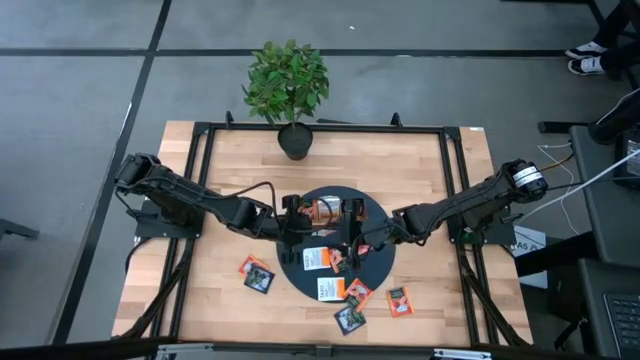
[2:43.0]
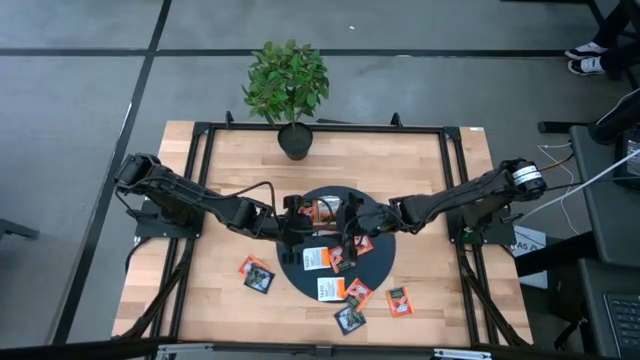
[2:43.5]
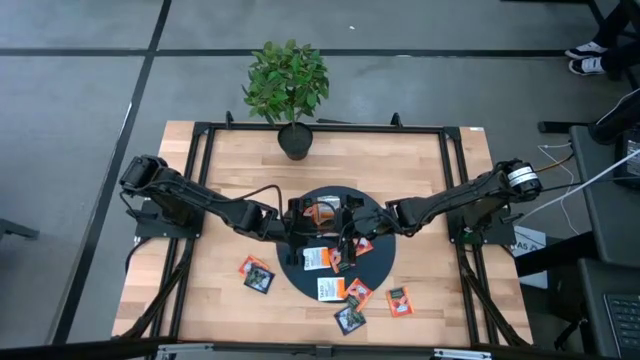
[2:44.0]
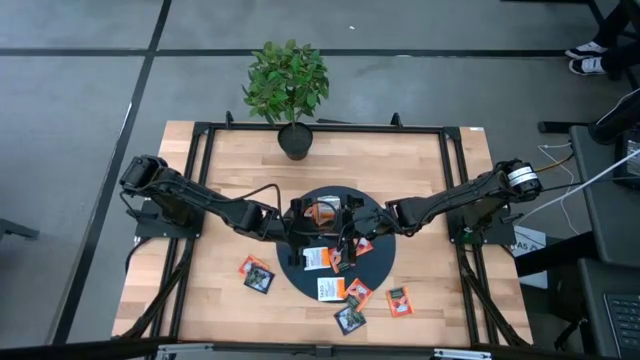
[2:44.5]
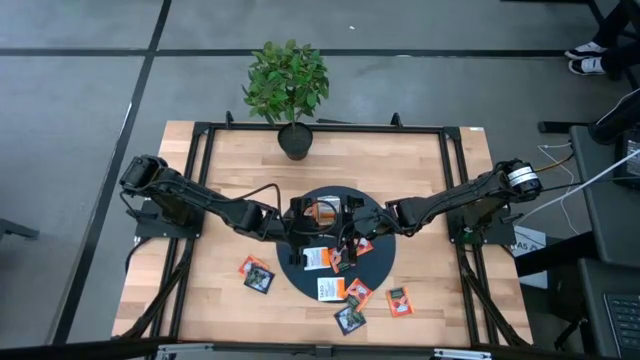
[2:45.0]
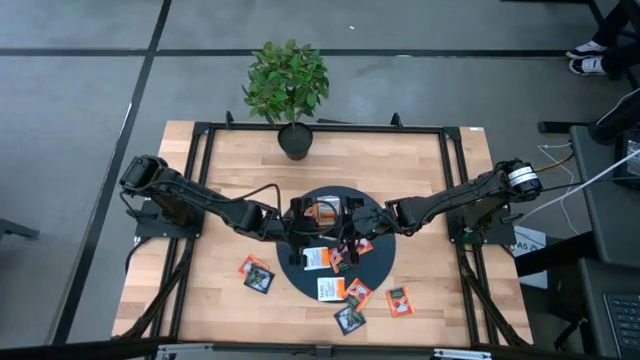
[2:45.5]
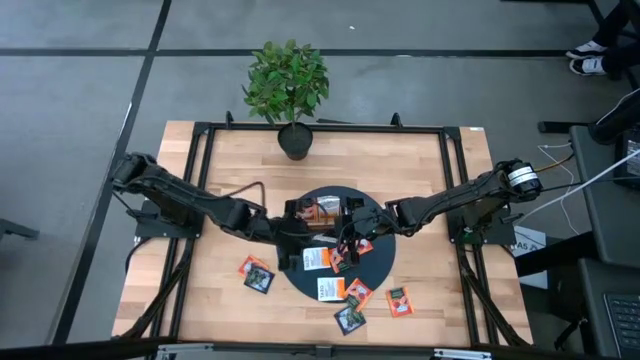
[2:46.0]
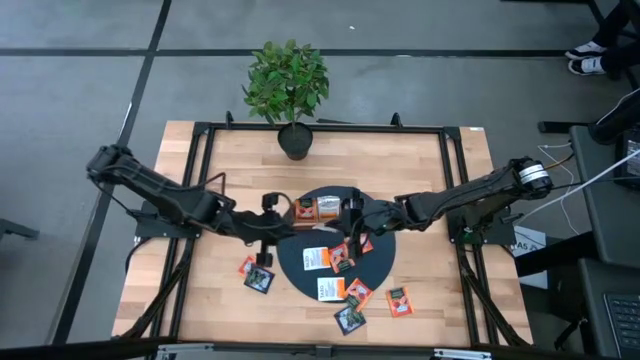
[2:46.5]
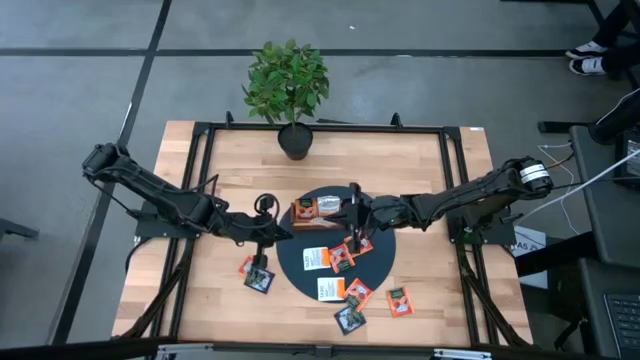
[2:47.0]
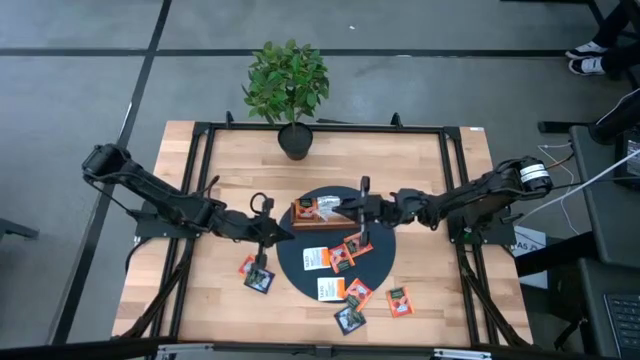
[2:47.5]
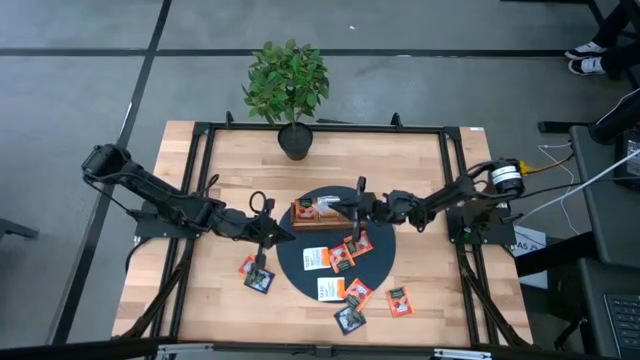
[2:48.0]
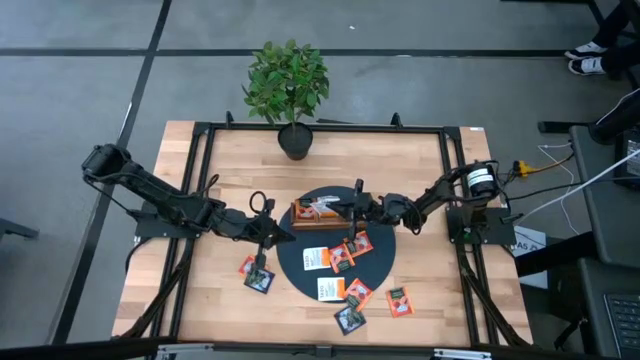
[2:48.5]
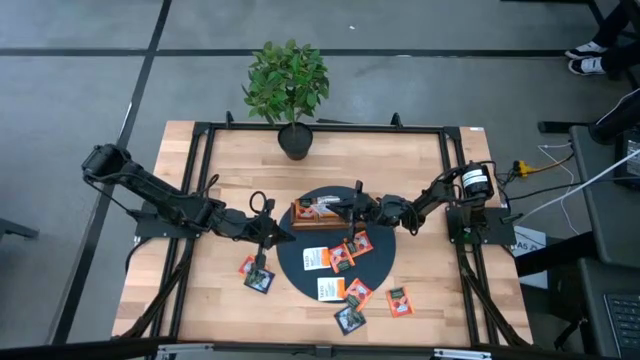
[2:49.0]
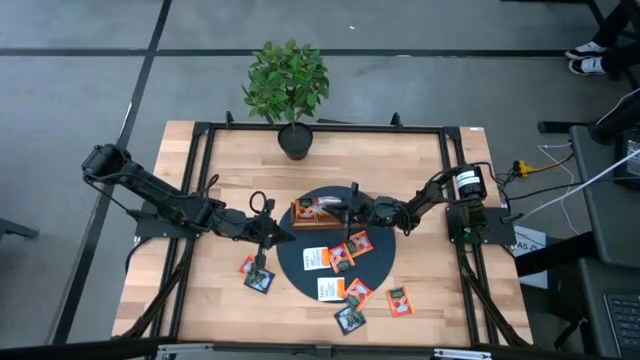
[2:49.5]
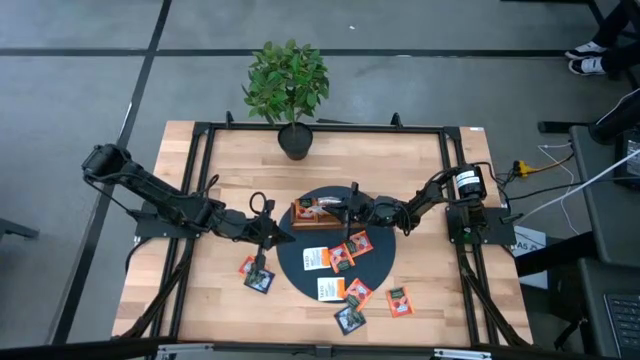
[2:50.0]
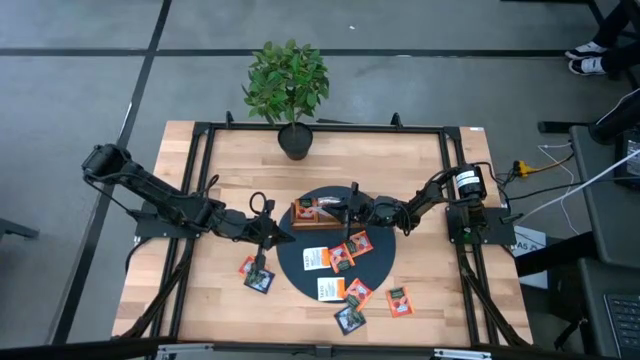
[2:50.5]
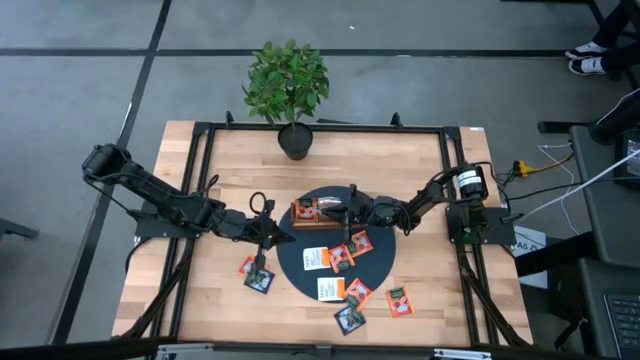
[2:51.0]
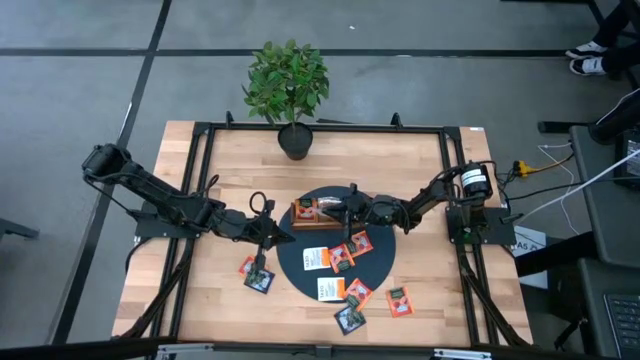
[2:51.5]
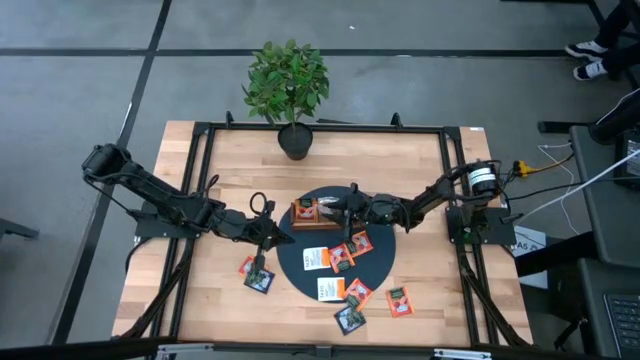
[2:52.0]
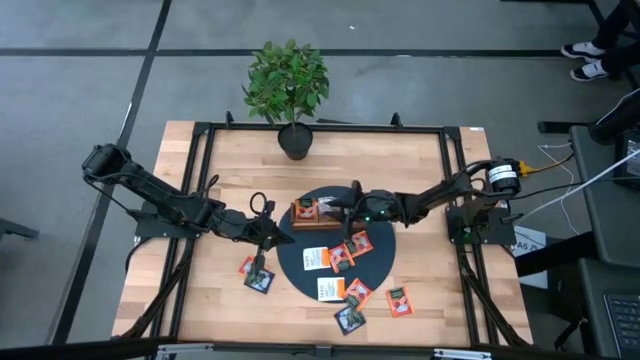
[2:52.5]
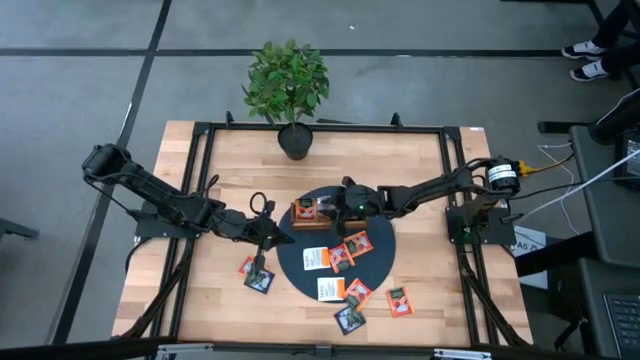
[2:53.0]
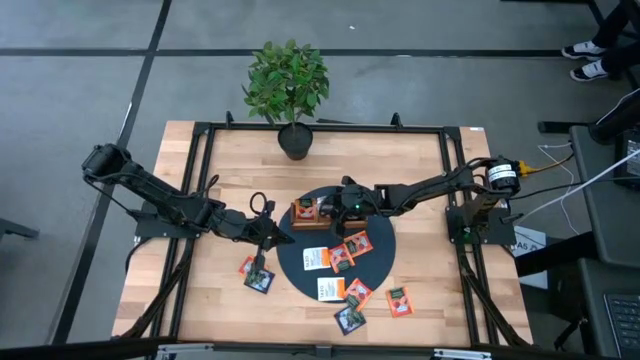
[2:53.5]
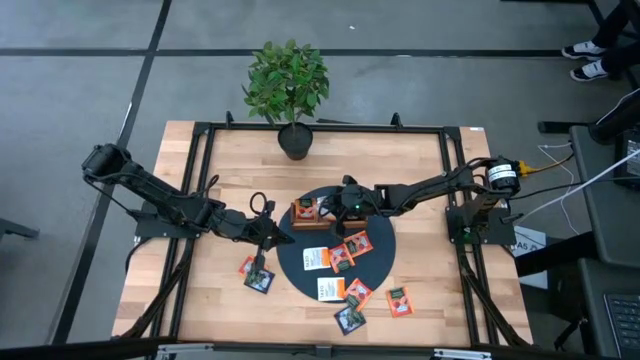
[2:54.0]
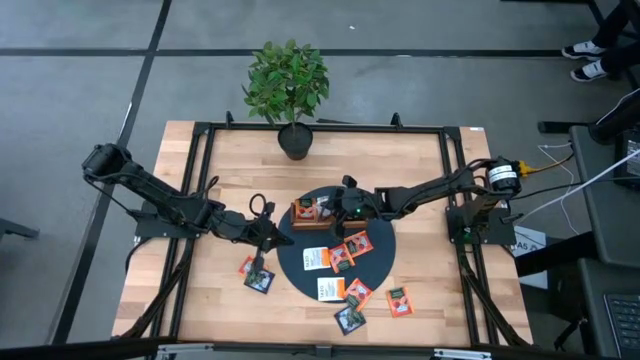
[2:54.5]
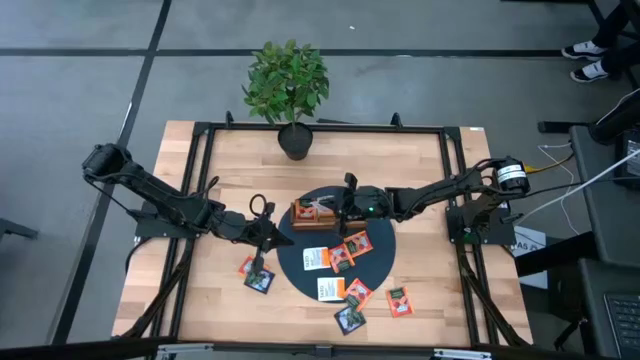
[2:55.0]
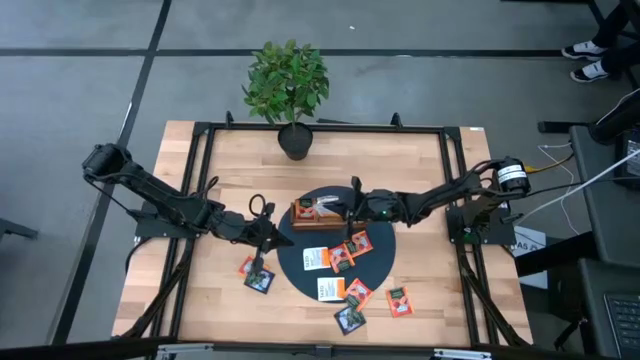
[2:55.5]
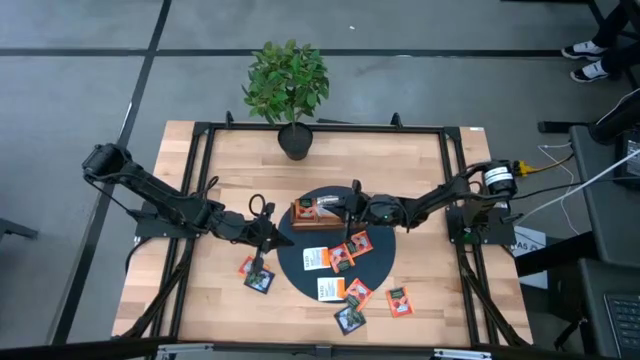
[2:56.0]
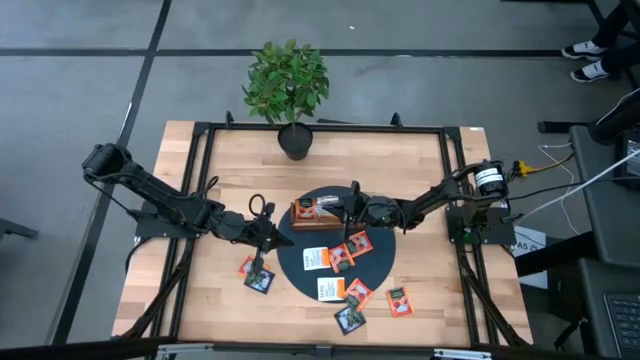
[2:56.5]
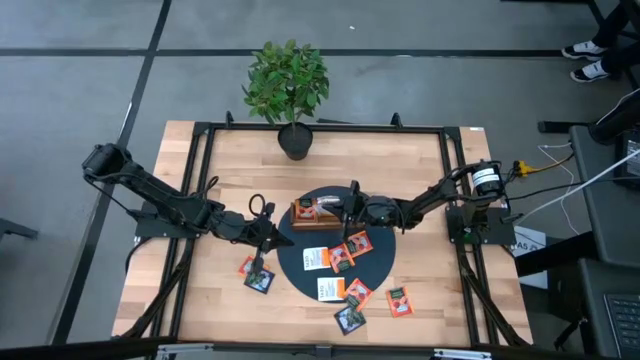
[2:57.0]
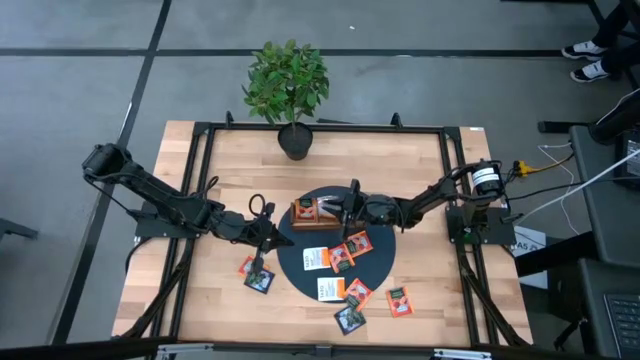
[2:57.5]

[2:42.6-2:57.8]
Task: Pick & Place Tea
Put the white tea bag into the middle of the wooden organizer

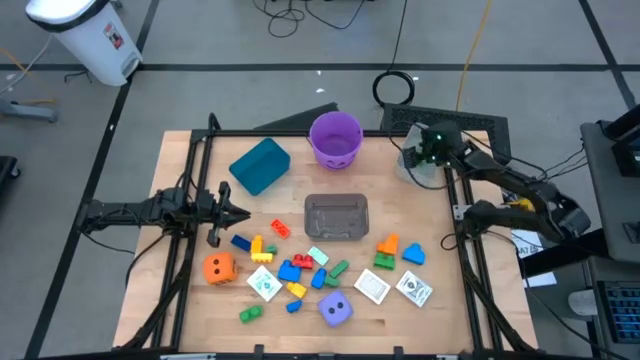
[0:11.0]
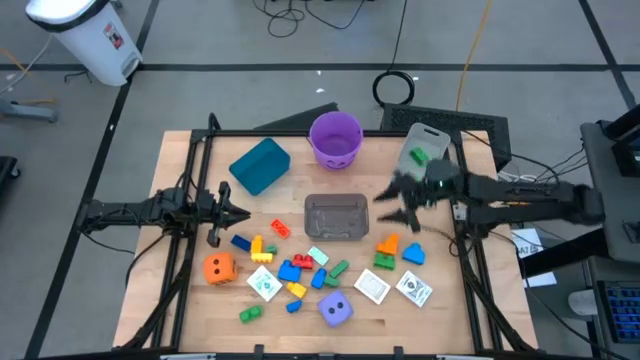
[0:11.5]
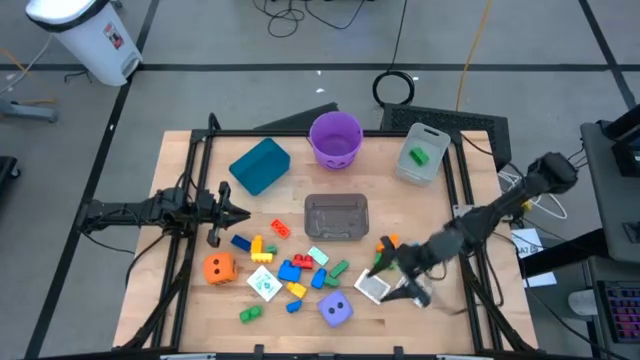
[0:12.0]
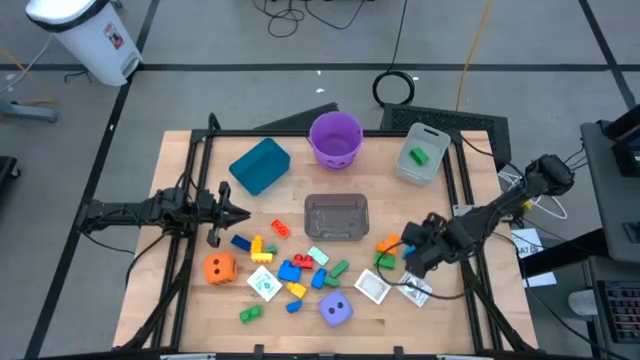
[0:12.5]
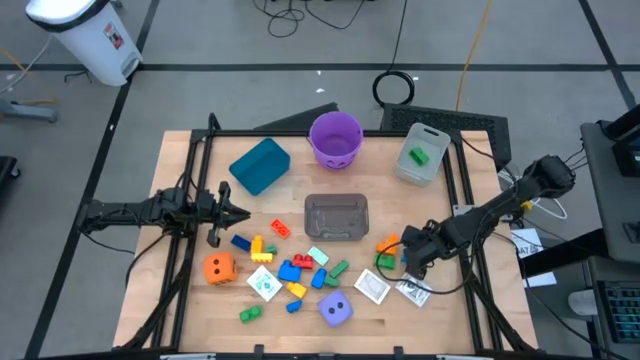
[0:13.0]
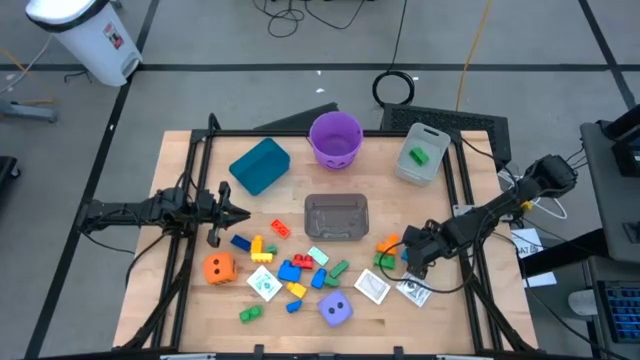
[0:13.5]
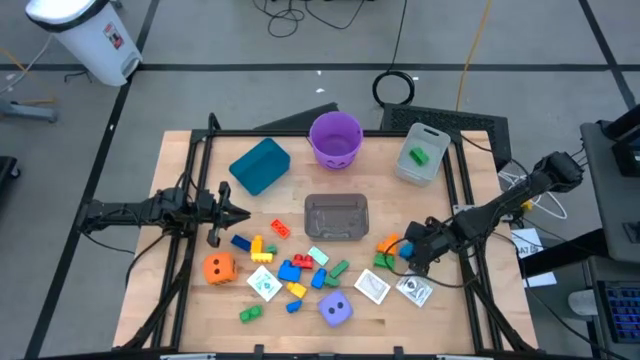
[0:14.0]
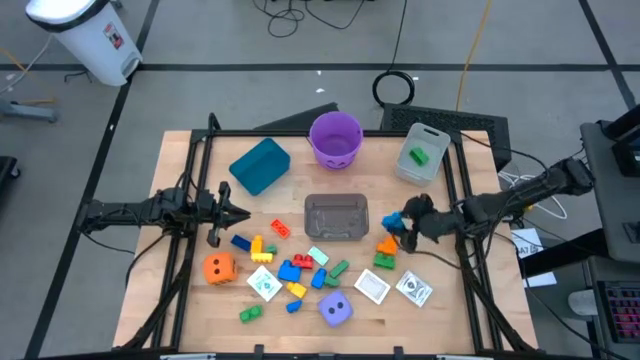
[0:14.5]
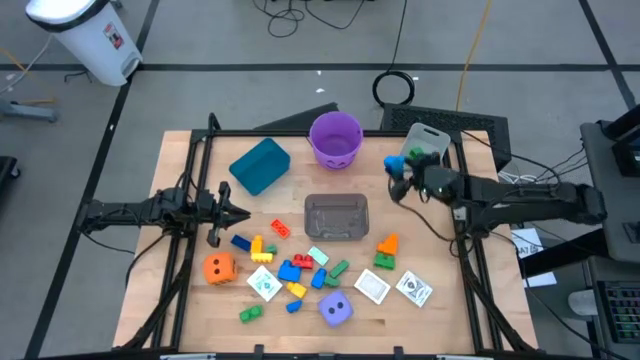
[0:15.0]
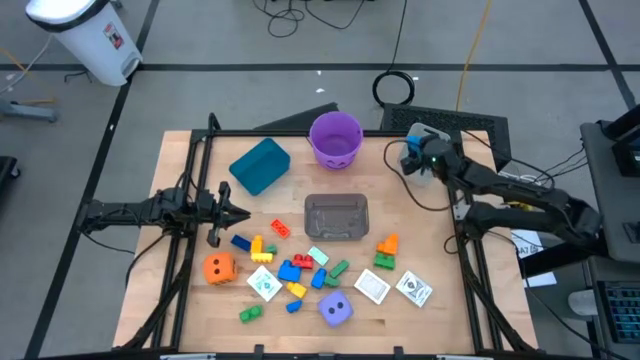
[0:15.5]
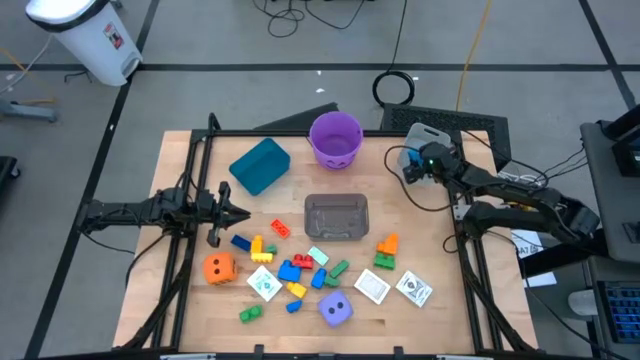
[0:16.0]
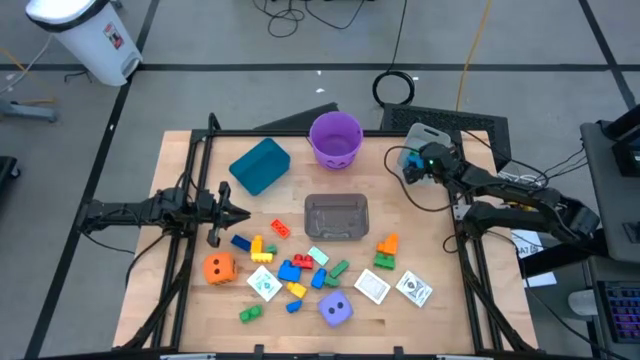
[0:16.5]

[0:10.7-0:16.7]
Task: Pick & Place Toys
Put the blue game piece into the white bin
